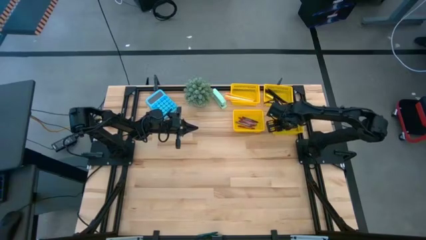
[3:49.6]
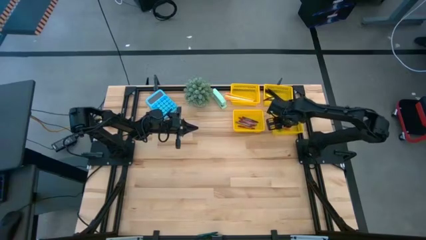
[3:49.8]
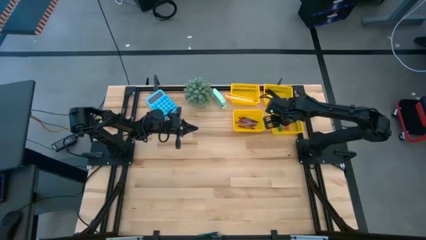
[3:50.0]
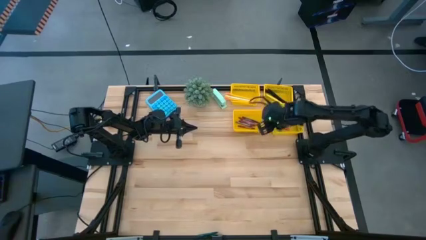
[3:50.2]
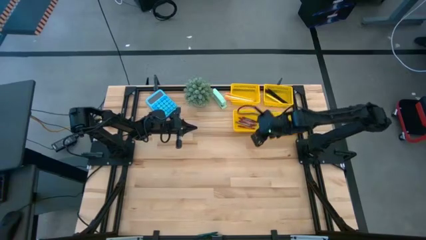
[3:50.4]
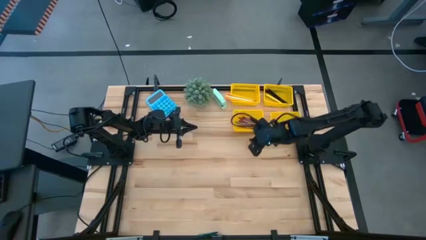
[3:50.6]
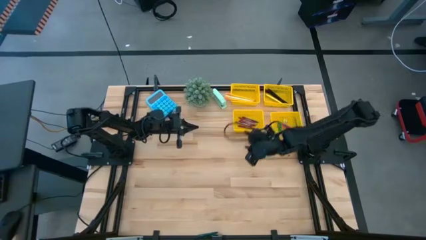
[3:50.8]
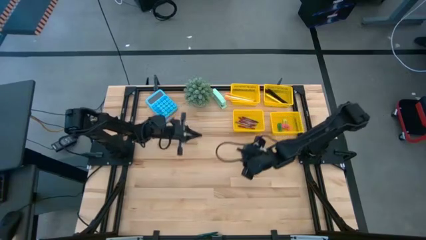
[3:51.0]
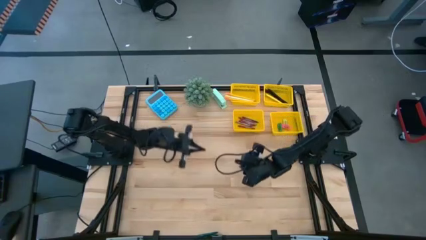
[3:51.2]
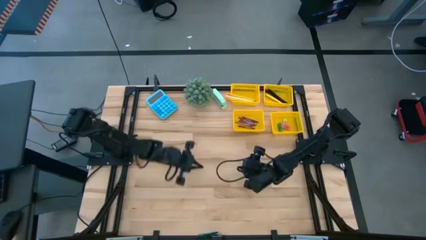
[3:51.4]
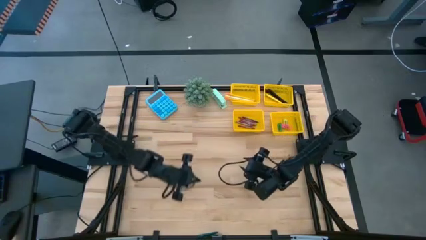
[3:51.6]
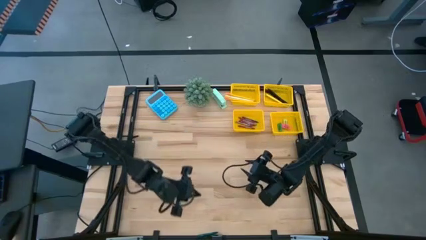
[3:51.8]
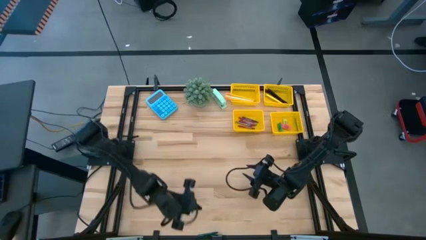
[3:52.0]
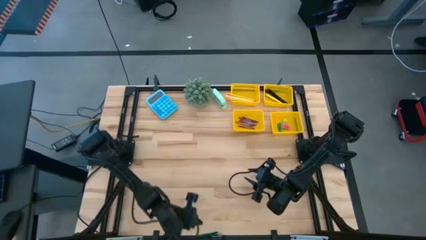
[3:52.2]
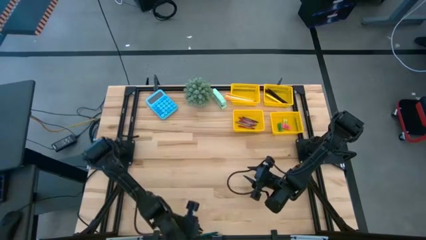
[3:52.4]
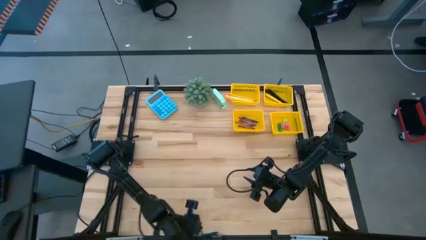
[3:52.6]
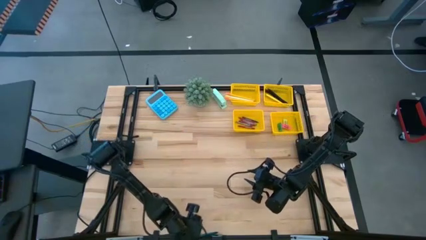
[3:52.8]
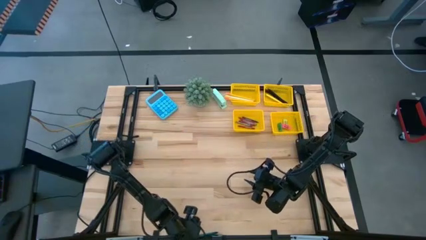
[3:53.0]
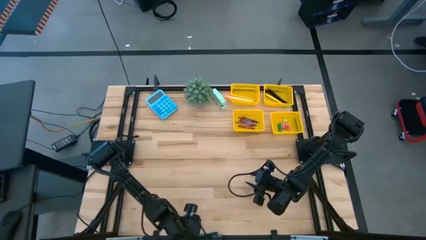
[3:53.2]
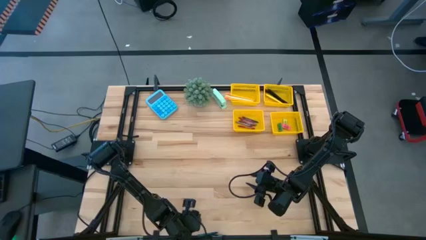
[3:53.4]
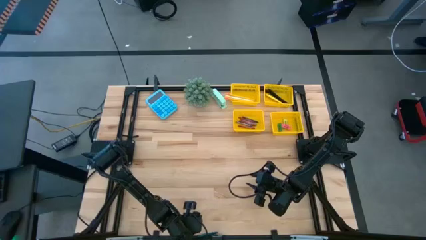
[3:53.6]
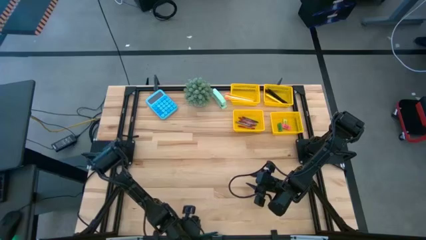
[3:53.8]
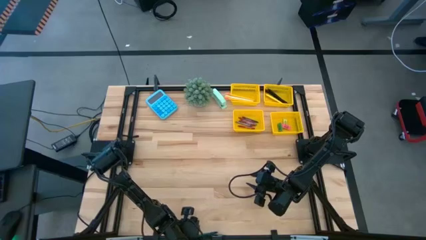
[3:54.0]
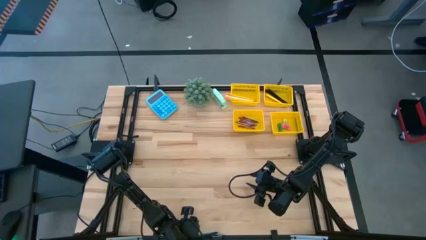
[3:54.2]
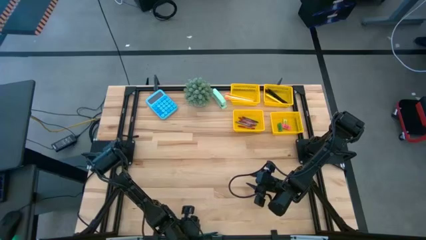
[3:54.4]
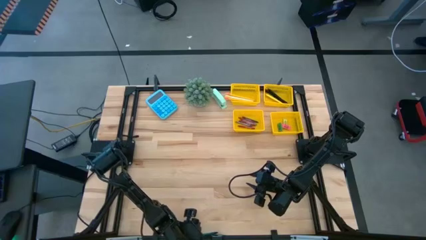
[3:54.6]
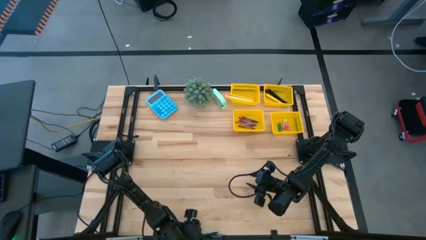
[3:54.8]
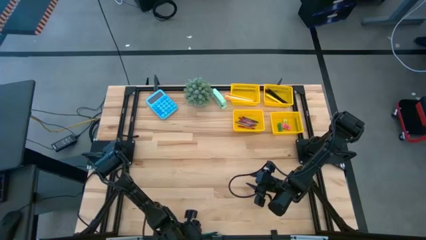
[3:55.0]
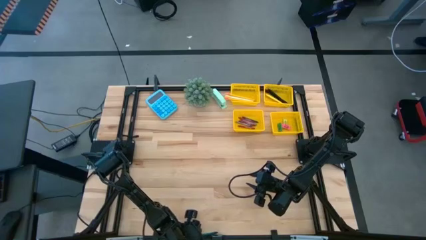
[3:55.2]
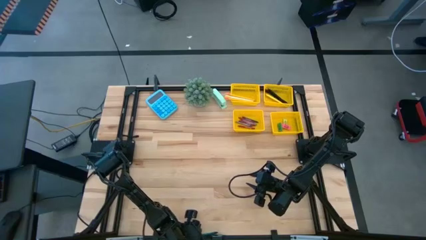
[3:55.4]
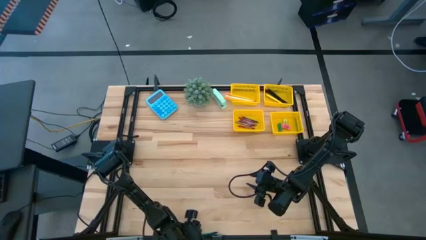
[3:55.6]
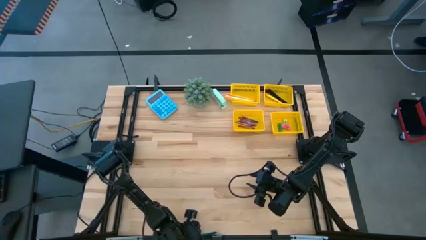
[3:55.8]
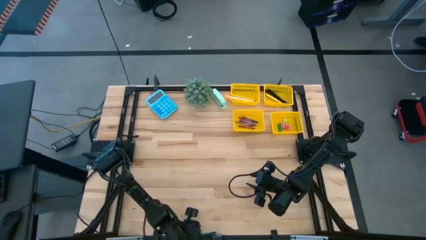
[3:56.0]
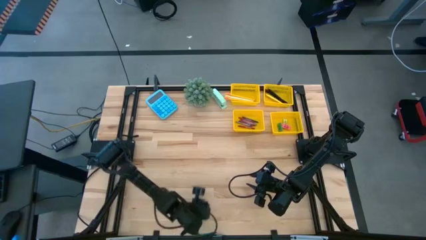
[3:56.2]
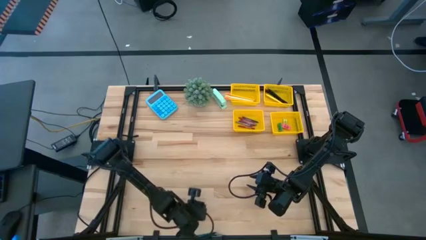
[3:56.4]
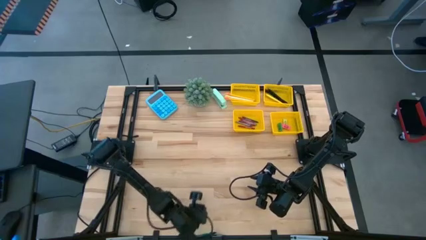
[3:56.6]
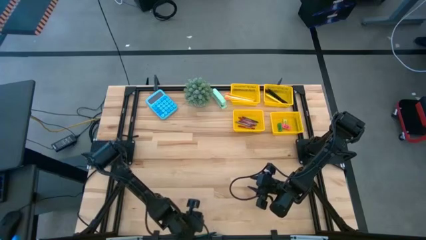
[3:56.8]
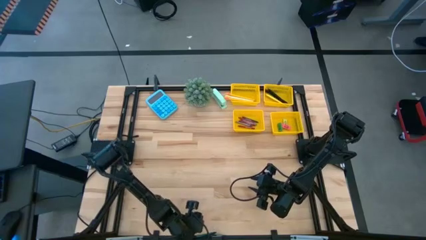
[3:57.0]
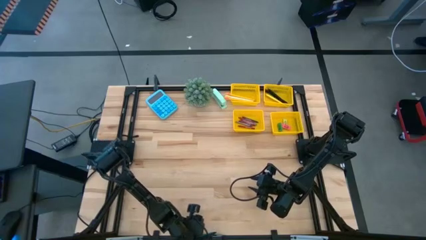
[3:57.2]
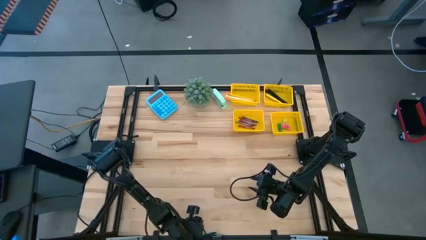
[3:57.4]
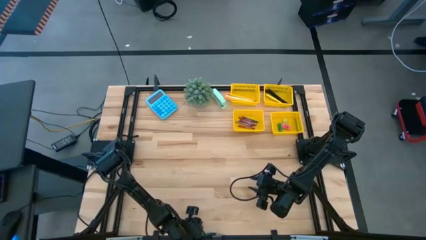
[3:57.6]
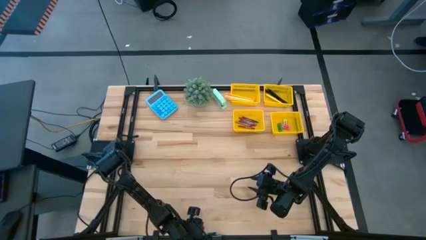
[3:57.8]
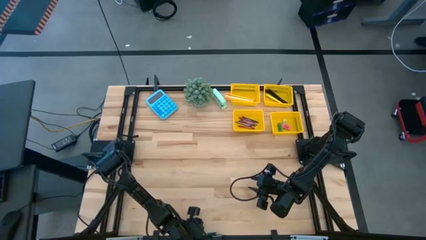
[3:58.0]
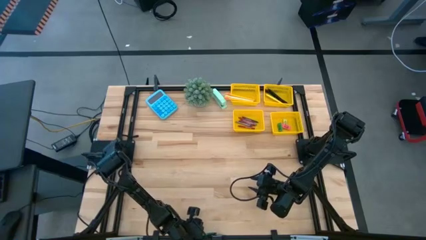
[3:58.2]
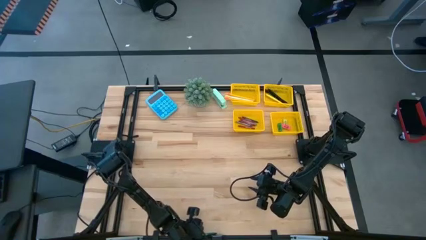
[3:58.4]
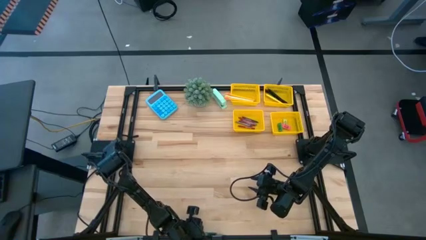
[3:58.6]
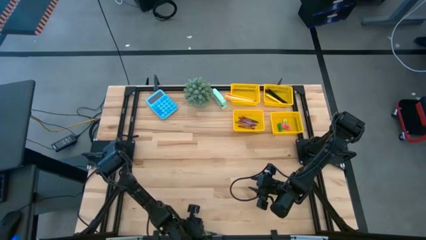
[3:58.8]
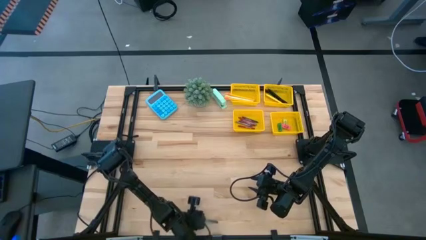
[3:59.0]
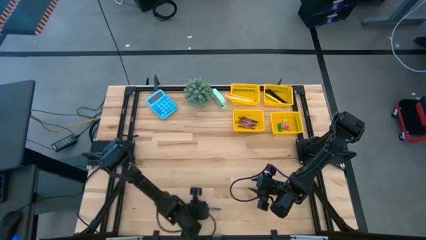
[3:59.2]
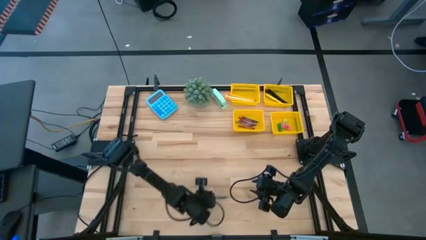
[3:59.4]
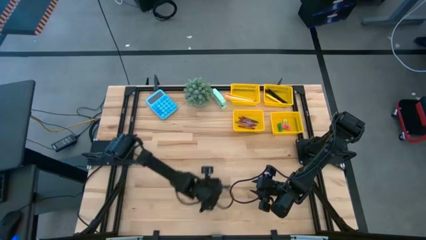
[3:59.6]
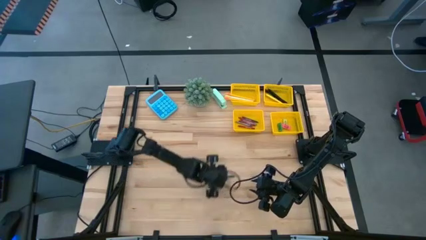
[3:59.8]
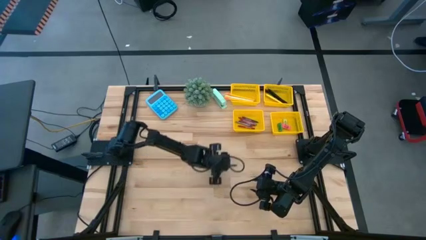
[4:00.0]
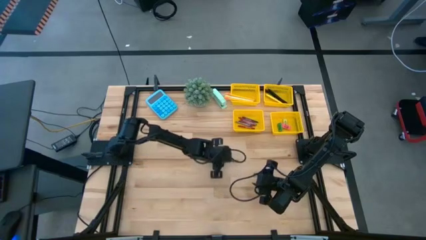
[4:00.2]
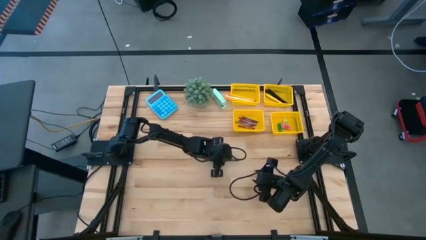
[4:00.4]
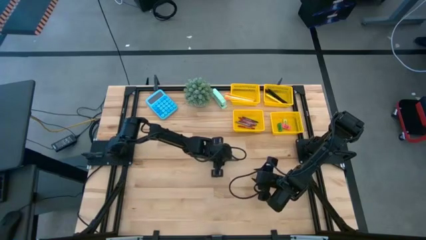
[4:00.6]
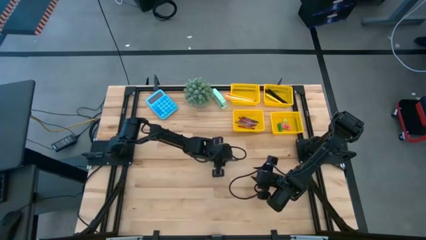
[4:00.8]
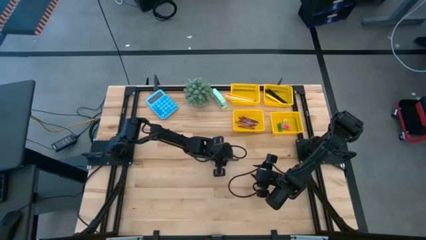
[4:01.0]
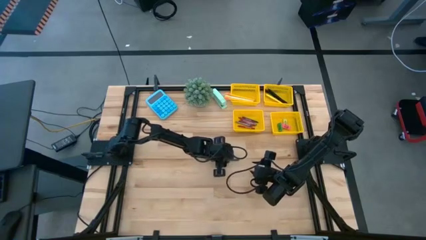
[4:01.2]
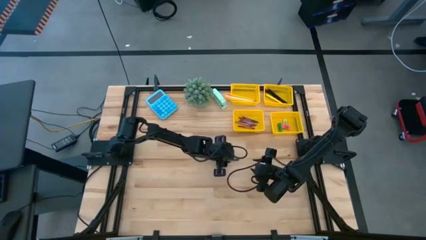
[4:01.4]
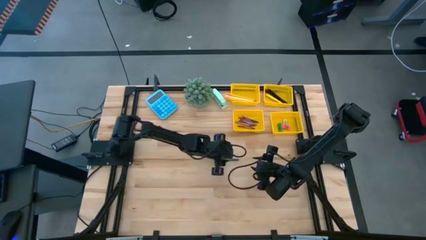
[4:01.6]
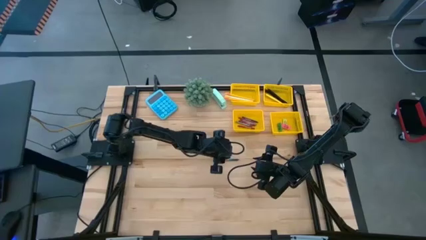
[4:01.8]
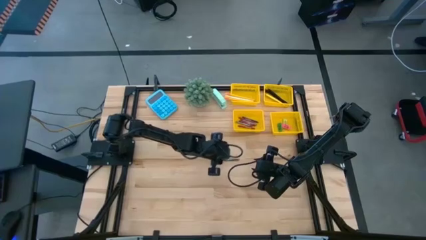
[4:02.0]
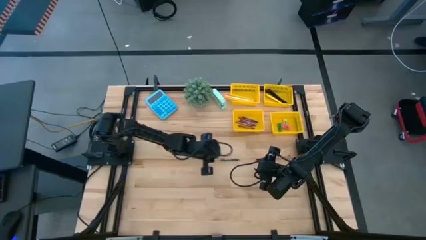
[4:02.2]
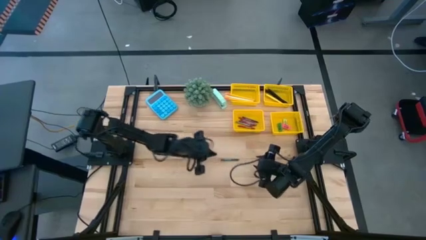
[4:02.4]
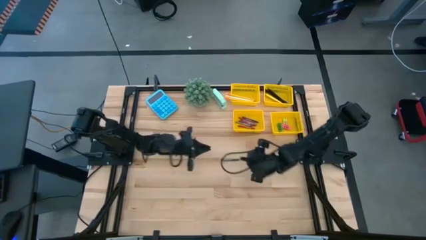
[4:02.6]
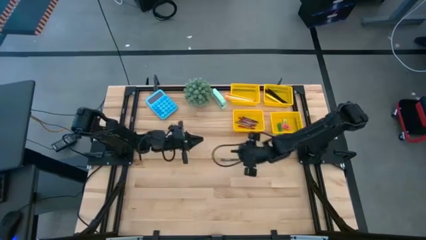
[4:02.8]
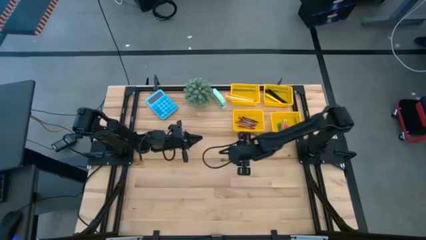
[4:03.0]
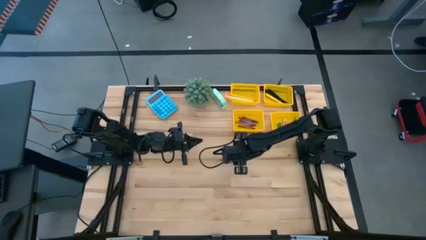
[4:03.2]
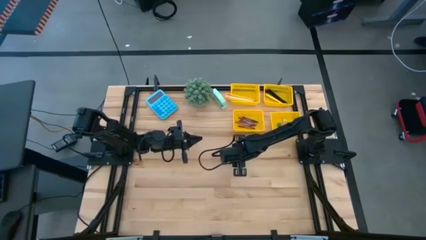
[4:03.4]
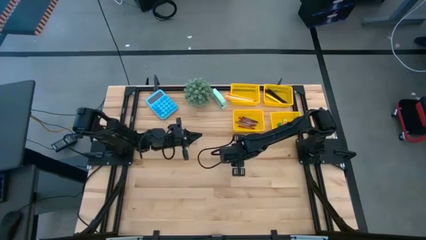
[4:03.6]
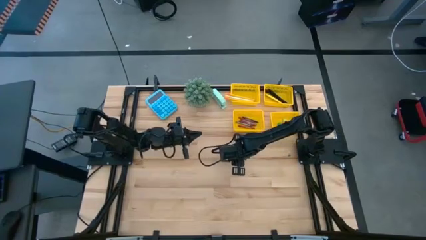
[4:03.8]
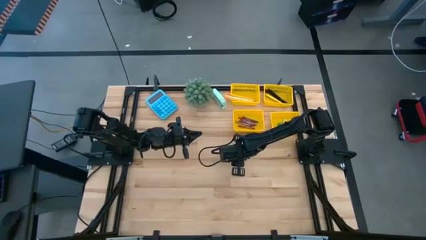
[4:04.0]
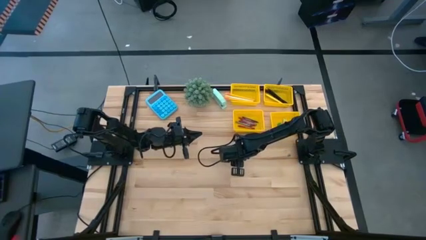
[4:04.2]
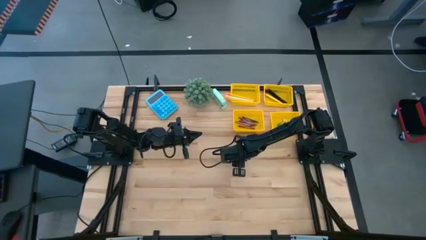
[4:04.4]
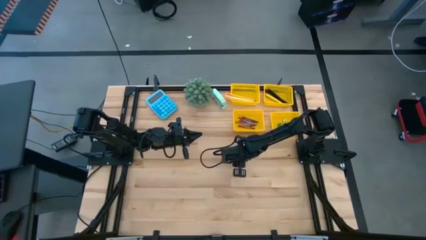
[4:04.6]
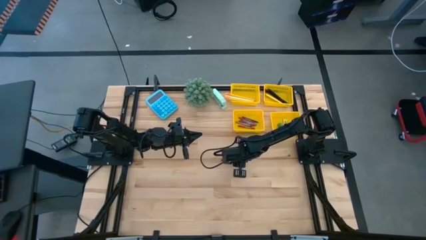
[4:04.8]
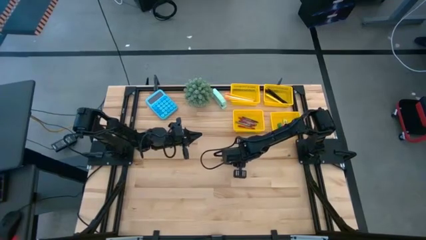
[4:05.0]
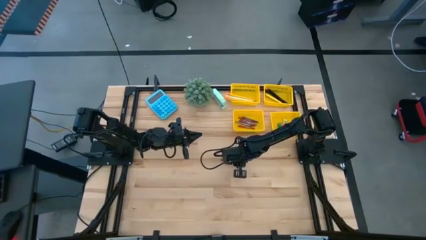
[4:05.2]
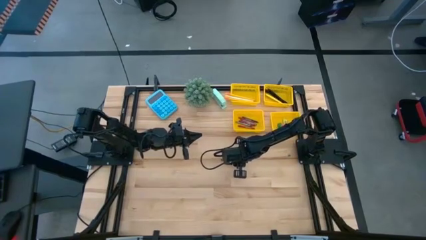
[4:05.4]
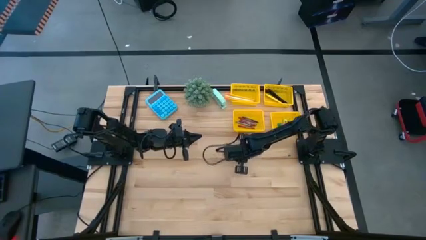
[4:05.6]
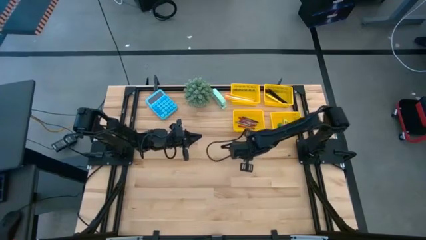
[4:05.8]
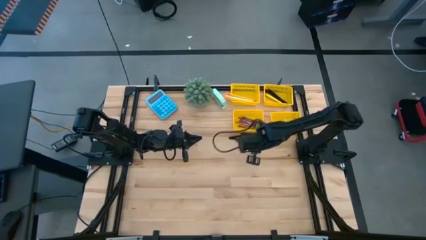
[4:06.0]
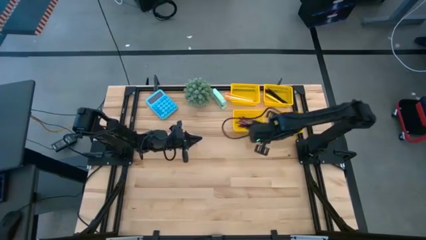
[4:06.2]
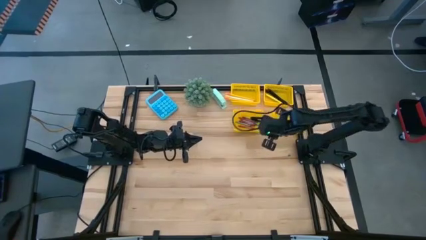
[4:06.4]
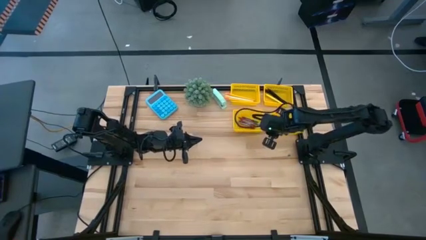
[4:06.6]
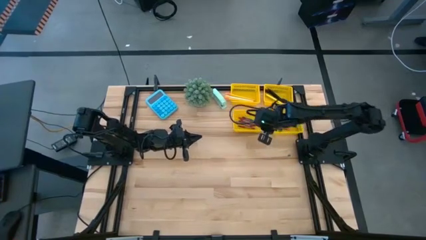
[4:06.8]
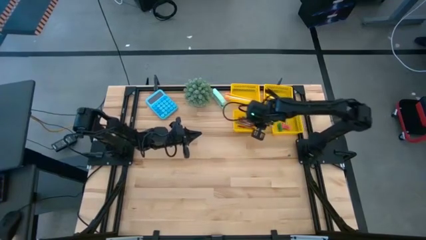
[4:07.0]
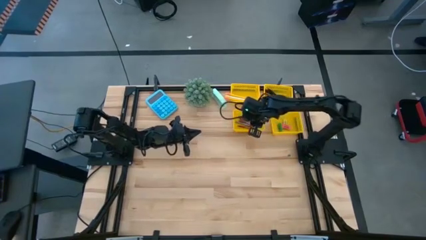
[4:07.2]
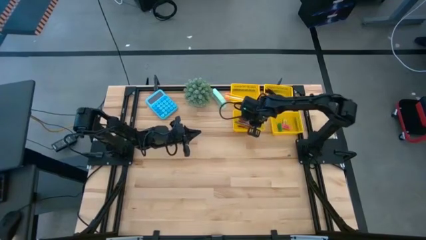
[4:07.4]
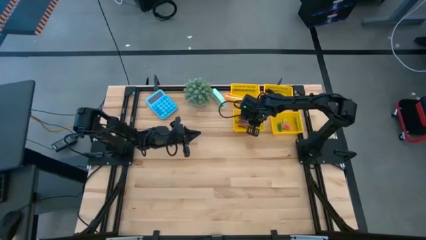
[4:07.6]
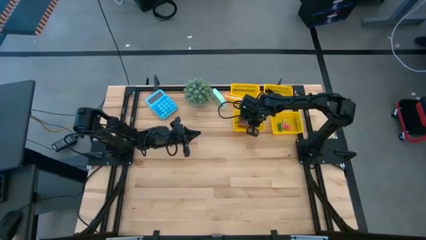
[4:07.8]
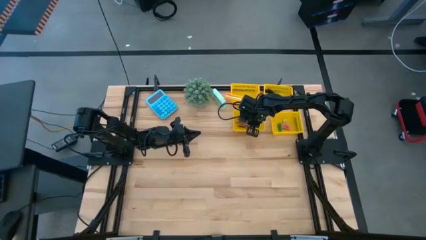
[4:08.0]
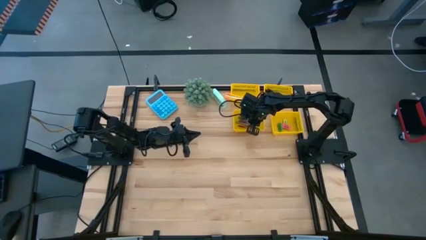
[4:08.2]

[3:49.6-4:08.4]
Task: Sort crayons/erasers/pens/pencils in bins
Put the green crayon into the bottom left yellow bin
